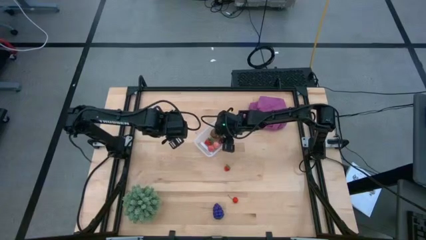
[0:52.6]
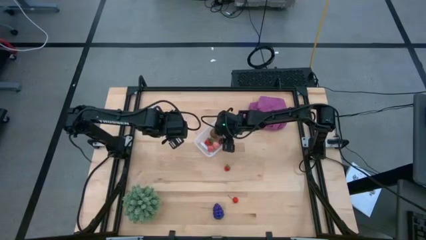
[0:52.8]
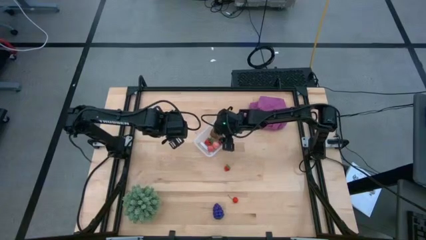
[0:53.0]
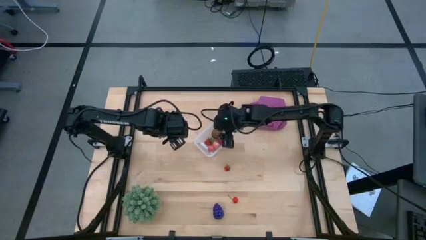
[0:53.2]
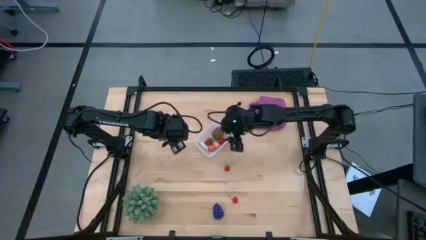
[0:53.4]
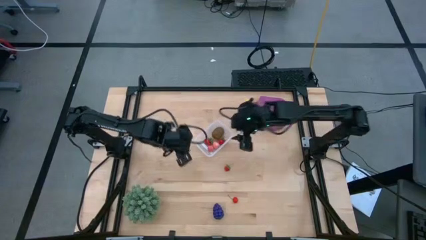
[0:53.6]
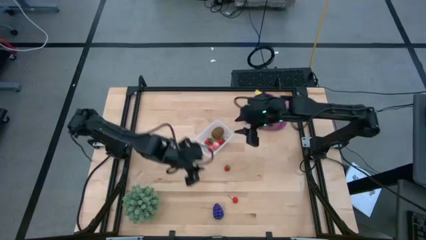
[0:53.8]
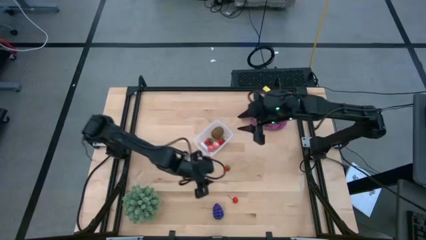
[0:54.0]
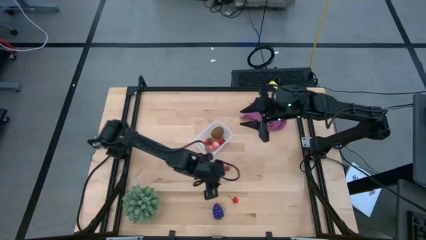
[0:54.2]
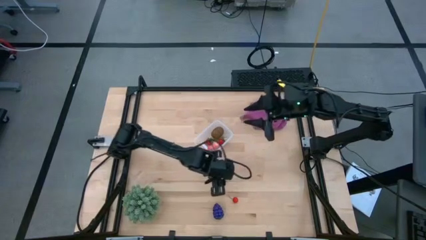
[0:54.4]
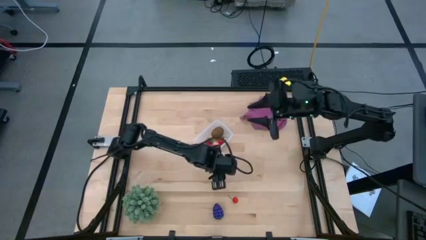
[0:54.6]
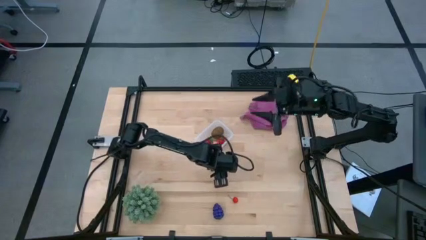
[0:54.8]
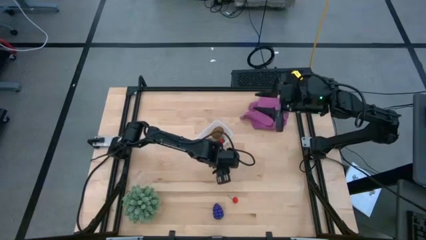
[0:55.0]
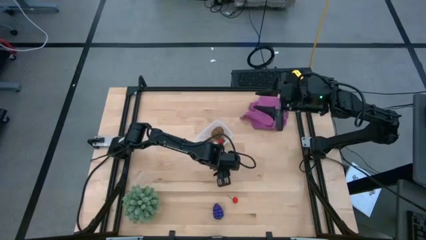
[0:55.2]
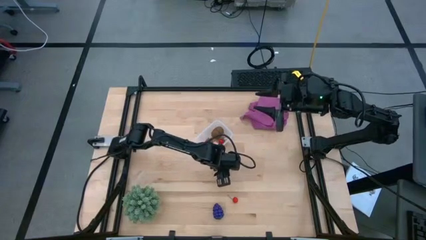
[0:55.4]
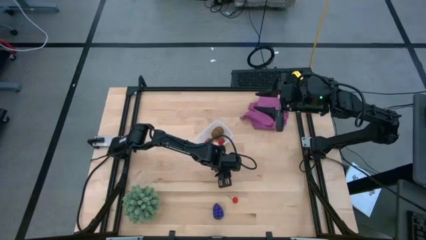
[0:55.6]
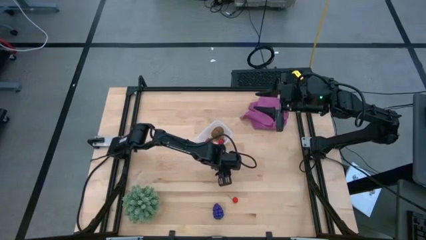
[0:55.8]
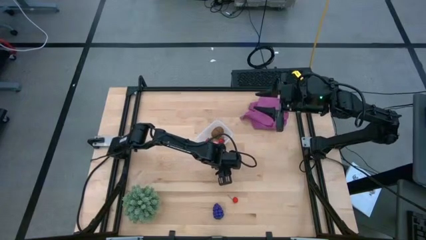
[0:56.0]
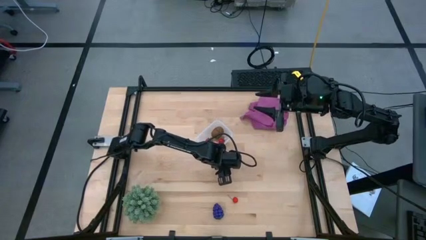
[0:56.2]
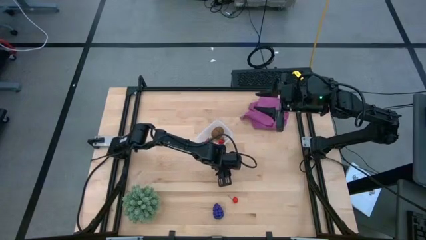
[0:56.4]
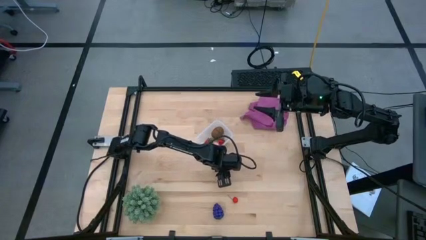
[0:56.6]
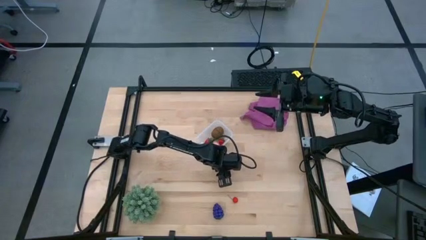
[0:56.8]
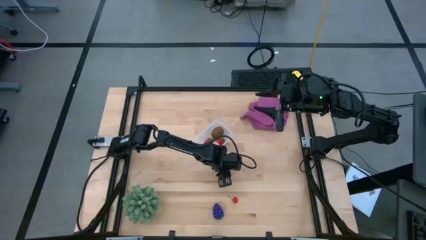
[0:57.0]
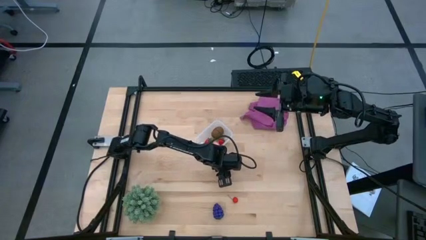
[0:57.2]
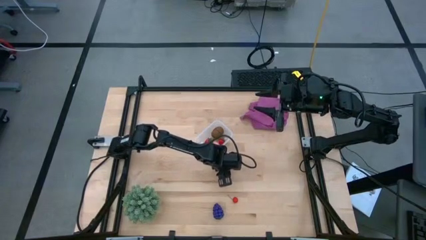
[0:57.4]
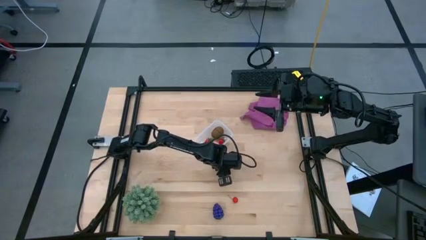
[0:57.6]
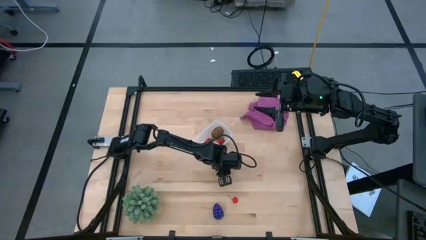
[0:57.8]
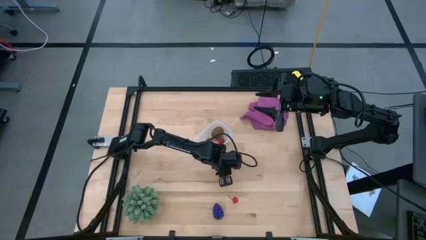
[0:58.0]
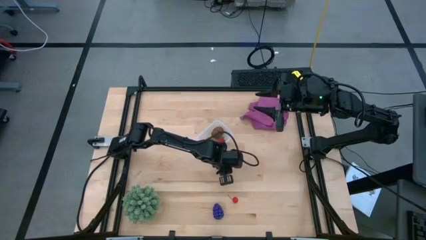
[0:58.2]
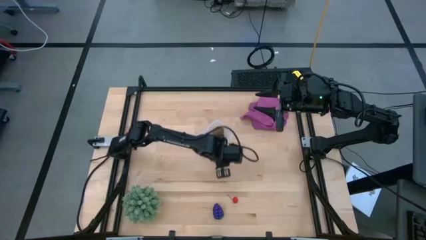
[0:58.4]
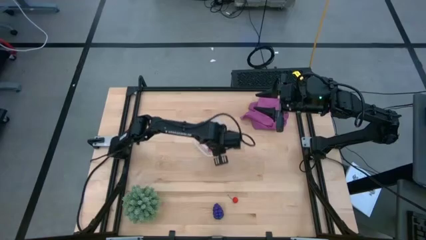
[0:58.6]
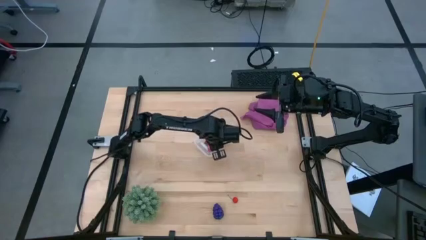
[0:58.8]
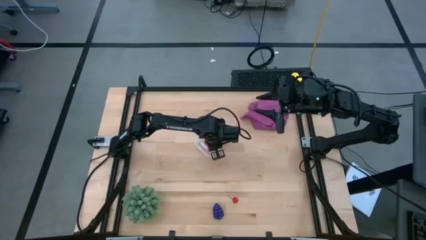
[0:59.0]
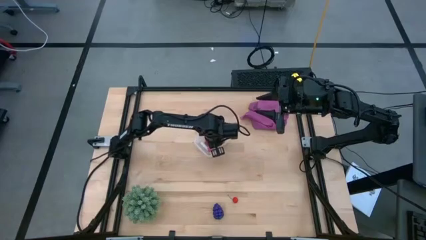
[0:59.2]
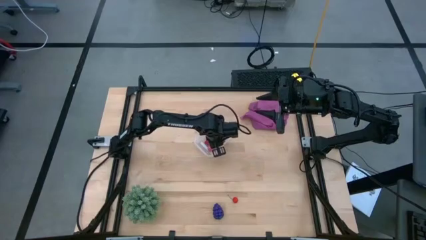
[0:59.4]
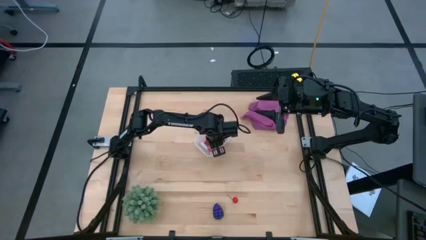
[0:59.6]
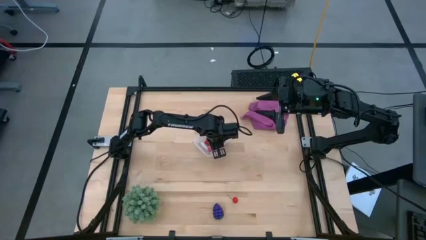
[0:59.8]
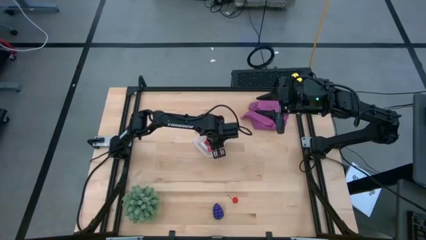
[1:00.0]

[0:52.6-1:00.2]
Task: Pick and placing Produce into tupperware
Put the red raspberry into the transparent bin

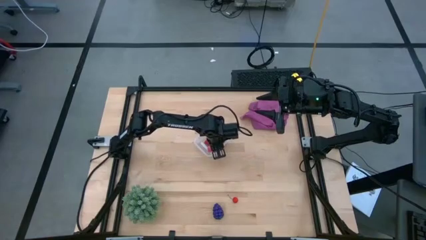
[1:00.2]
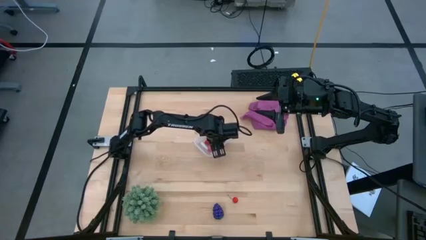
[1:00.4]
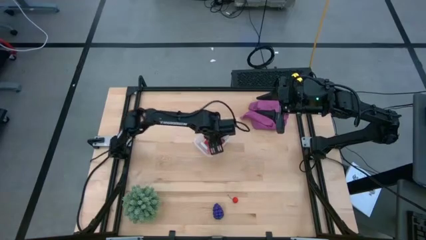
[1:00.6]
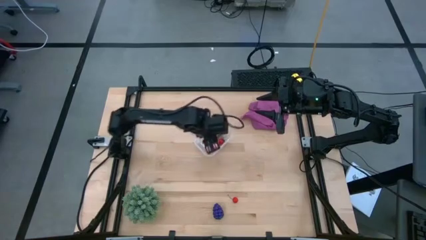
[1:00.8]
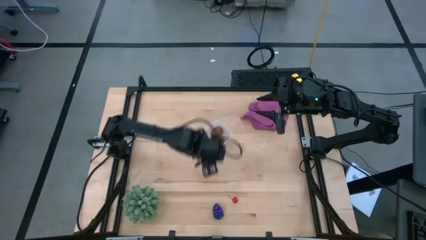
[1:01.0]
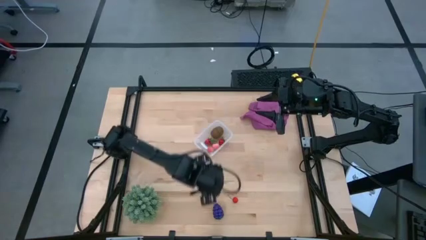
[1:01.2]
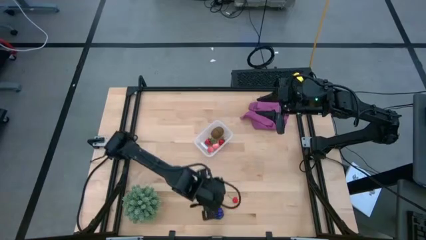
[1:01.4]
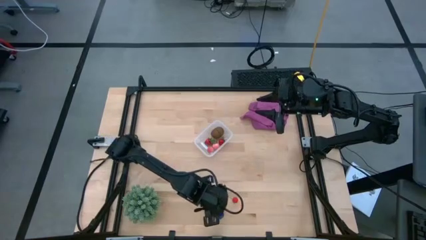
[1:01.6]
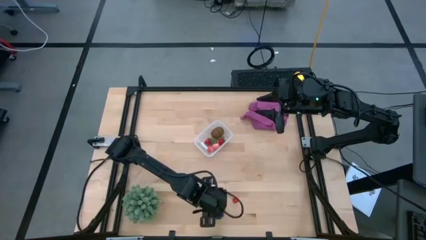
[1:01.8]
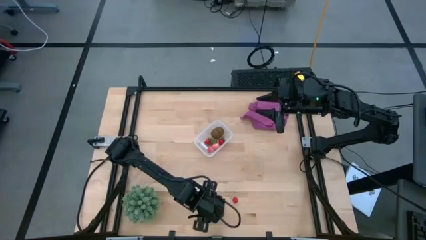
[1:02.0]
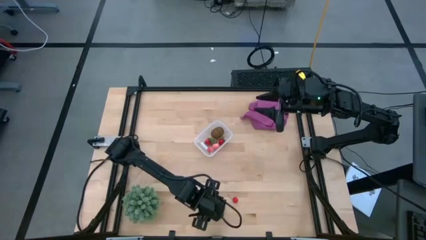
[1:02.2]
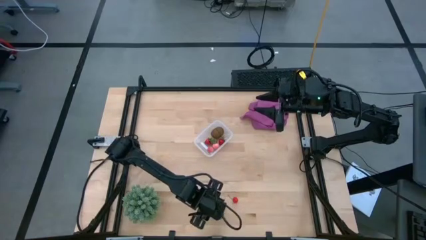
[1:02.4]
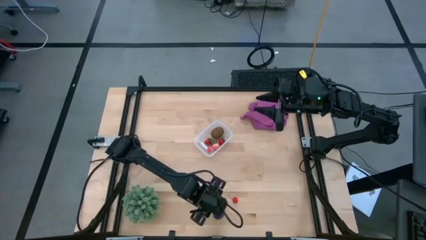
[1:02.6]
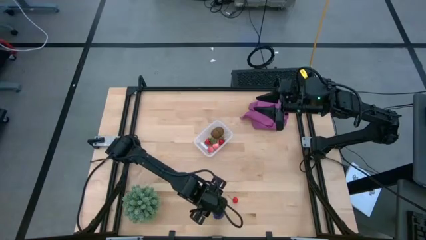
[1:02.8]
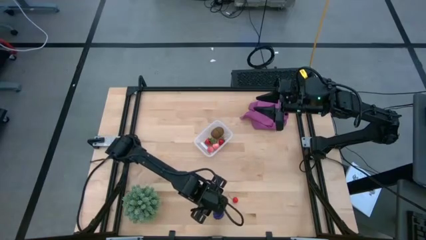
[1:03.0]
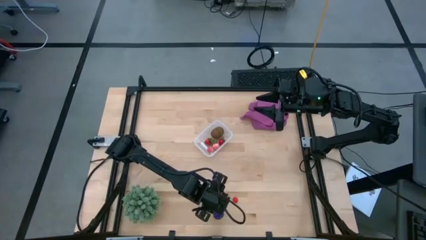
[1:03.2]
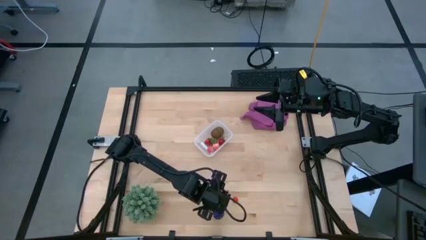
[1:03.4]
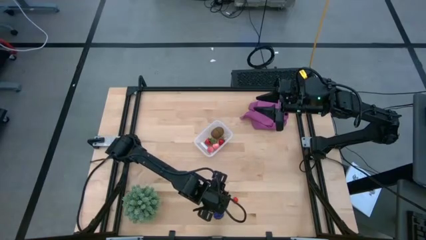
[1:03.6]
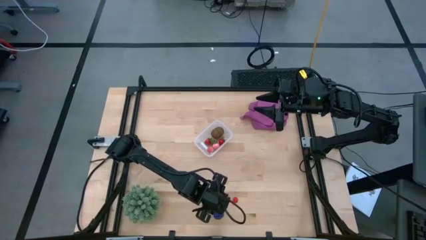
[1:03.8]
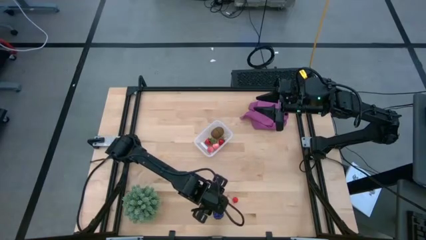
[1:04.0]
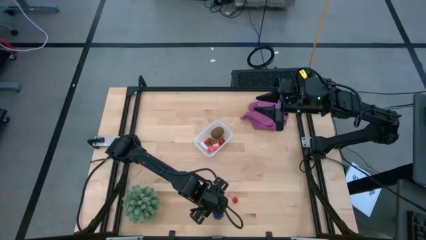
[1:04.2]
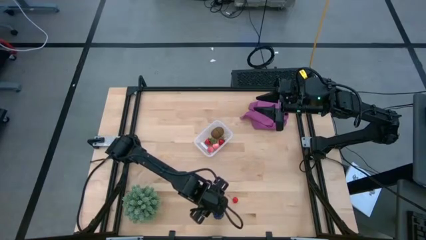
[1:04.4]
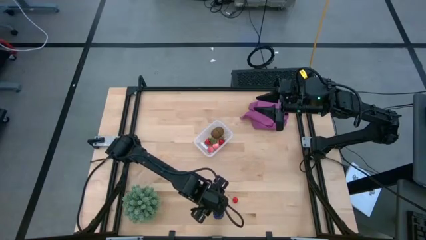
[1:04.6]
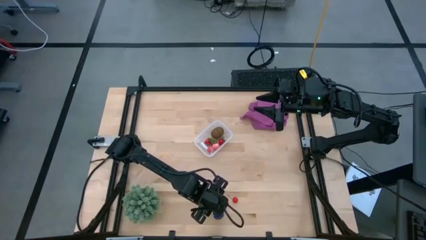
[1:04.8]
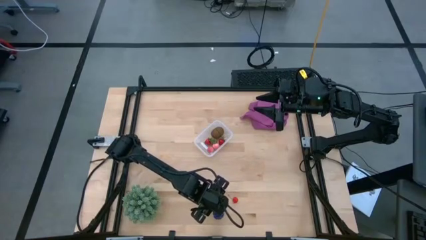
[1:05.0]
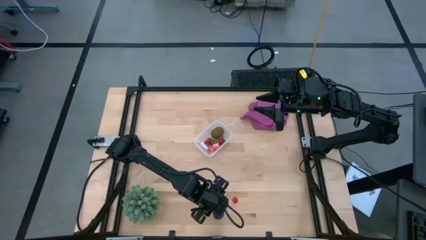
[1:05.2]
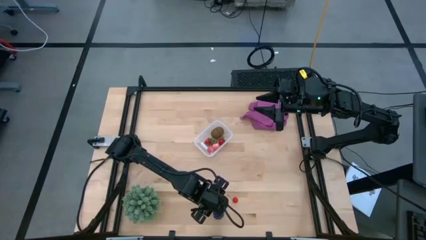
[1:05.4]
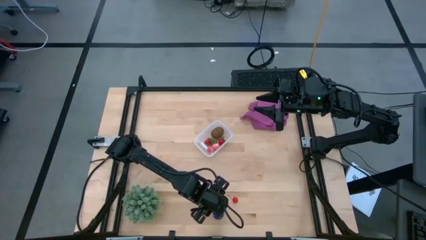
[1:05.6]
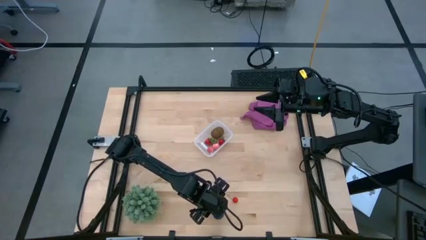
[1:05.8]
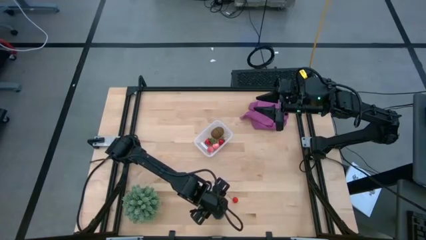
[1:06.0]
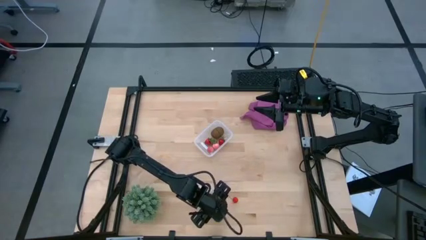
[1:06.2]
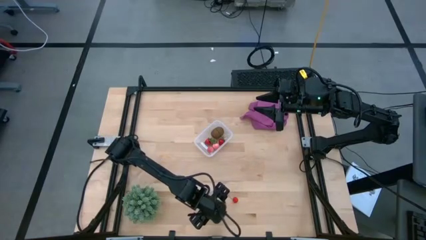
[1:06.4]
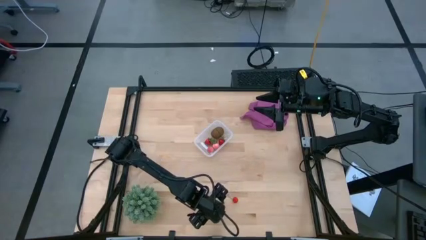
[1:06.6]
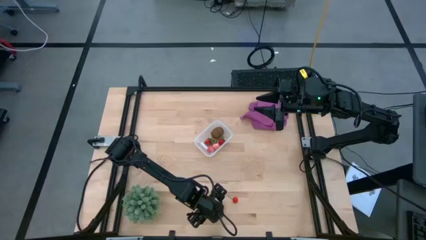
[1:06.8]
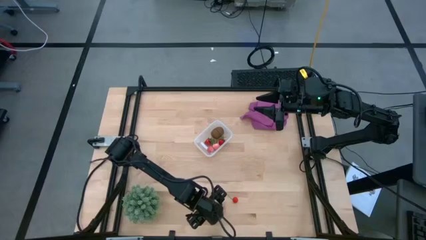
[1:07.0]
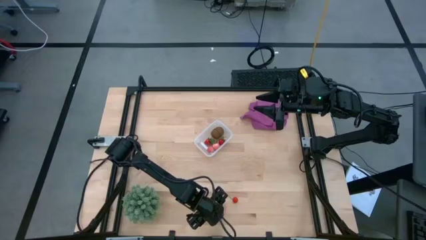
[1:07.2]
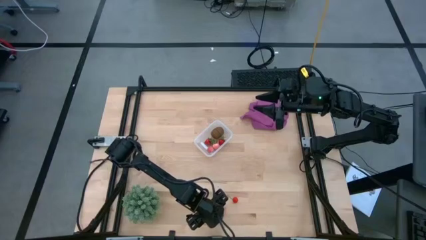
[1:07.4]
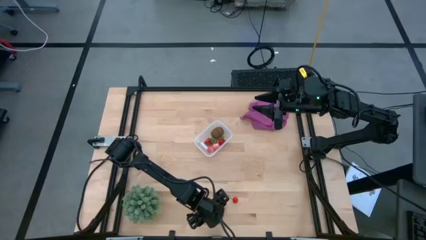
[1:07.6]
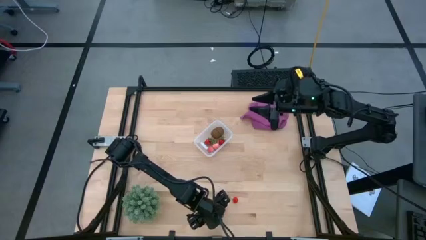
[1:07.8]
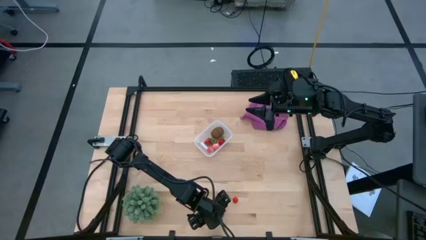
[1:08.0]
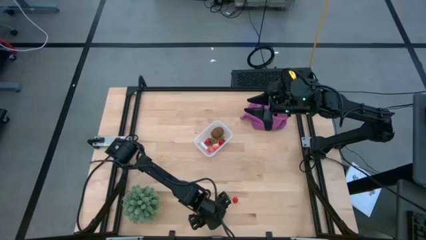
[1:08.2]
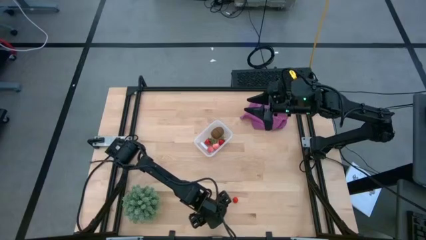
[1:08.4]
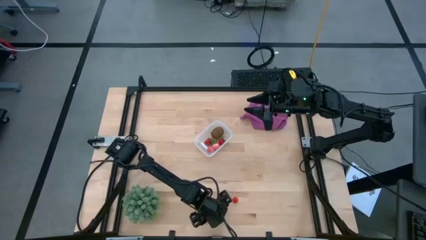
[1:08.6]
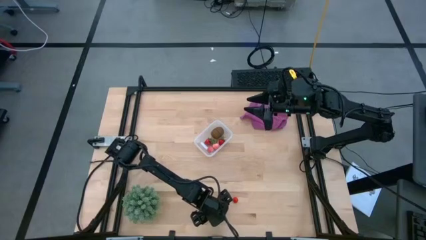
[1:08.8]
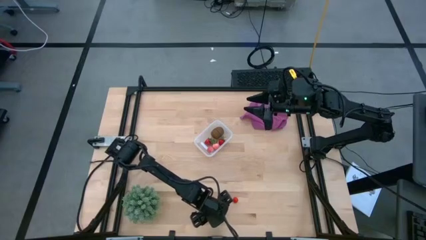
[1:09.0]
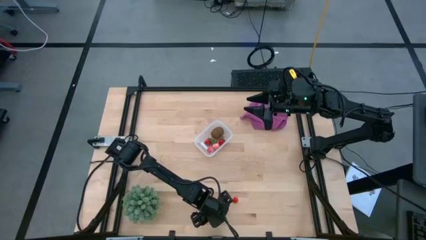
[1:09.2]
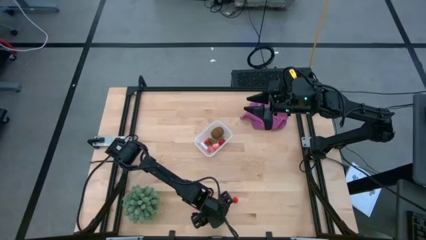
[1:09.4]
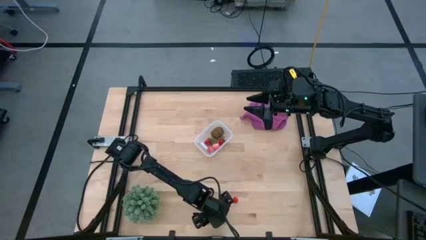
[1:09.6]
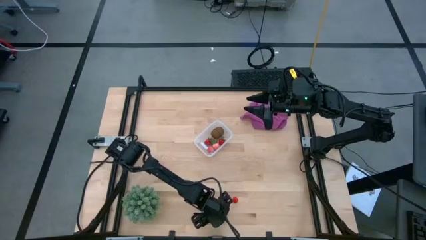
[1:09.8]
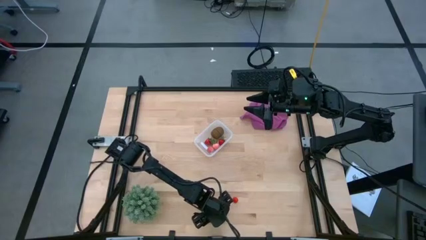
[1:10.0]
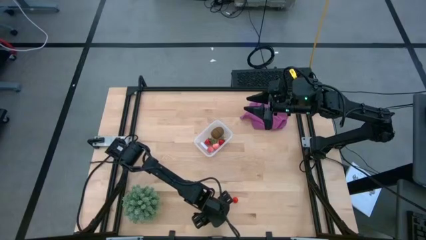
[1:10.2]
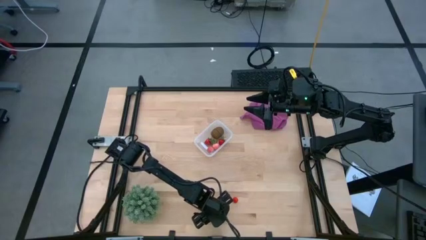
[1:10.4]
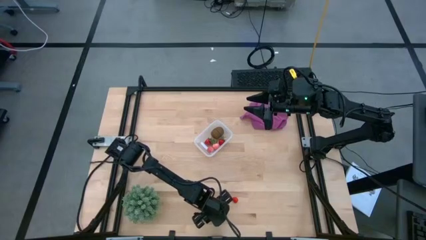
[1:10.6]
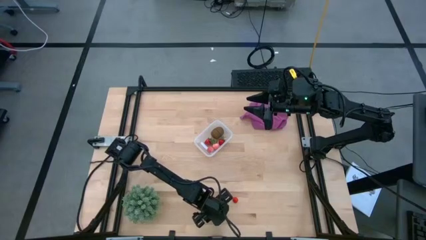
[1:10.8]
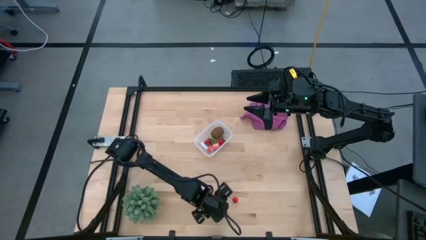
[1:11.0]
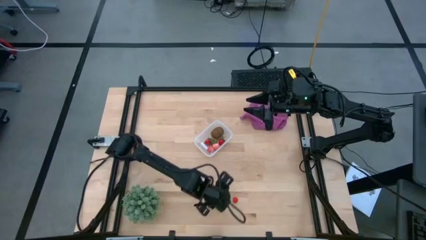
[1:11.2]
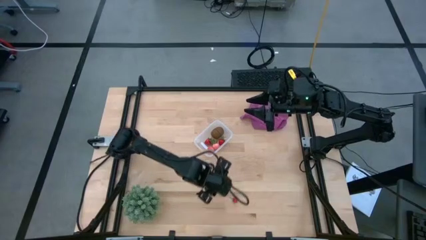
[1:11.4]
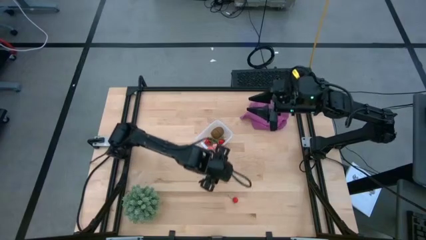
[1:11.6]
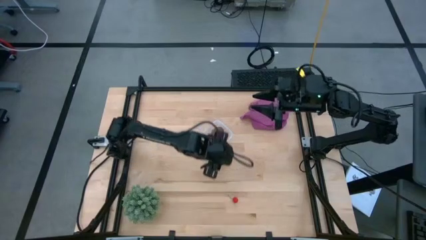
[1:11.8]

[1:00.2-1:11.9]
Put the blue raspberry into the transparent bin
